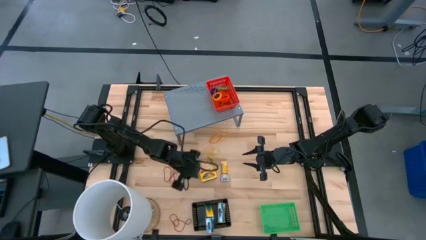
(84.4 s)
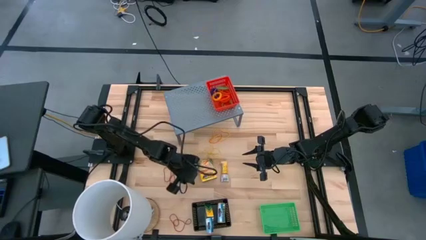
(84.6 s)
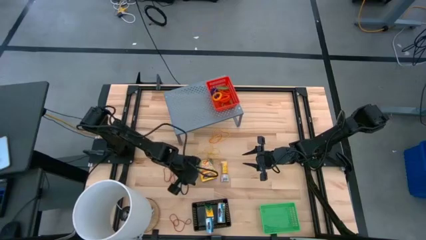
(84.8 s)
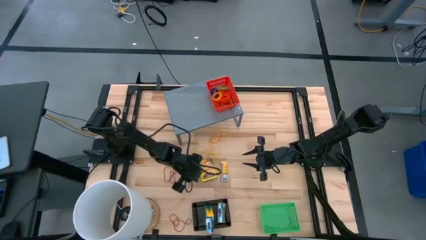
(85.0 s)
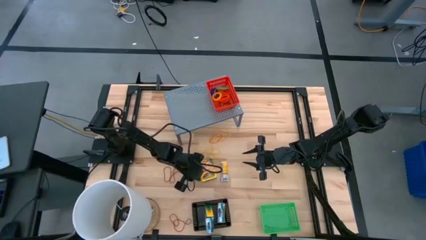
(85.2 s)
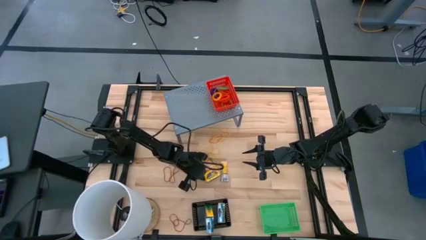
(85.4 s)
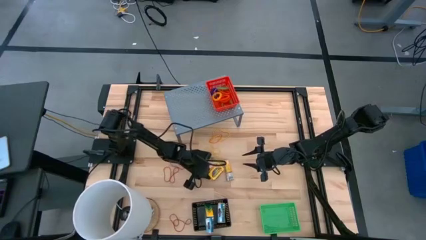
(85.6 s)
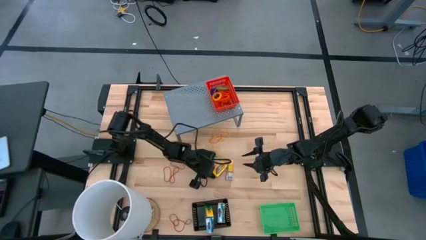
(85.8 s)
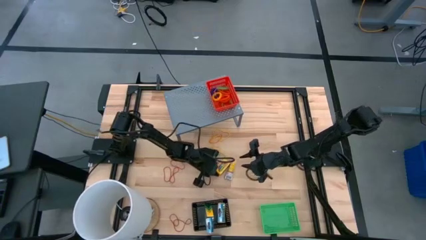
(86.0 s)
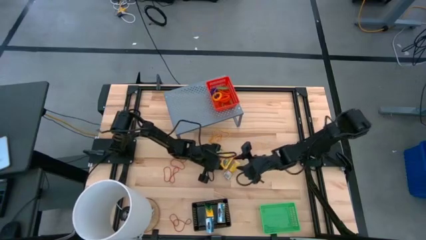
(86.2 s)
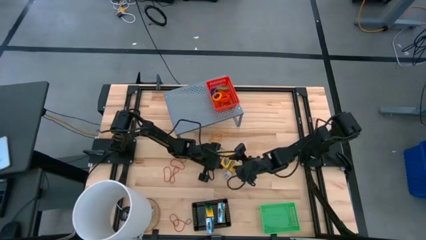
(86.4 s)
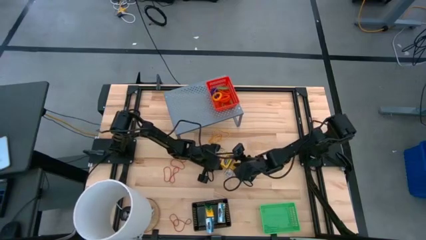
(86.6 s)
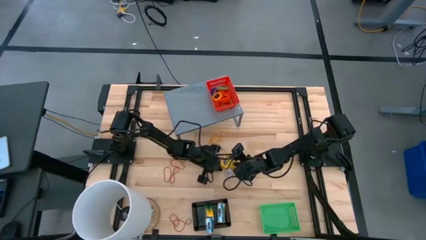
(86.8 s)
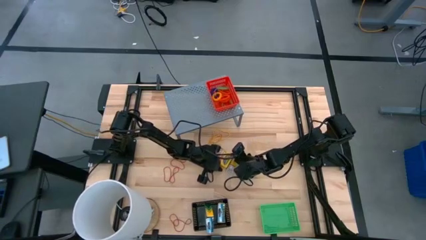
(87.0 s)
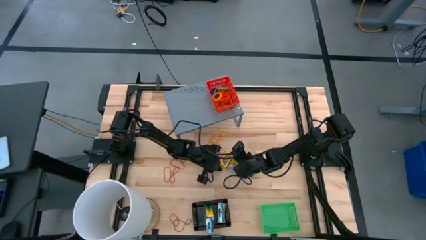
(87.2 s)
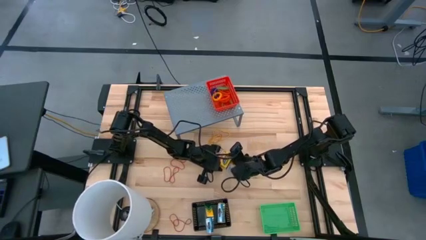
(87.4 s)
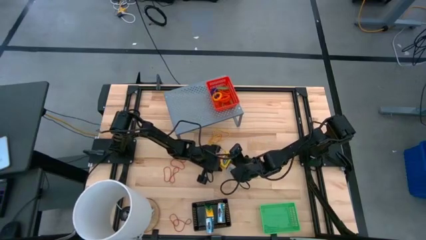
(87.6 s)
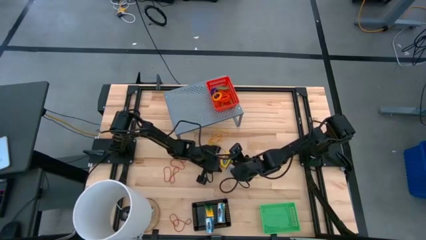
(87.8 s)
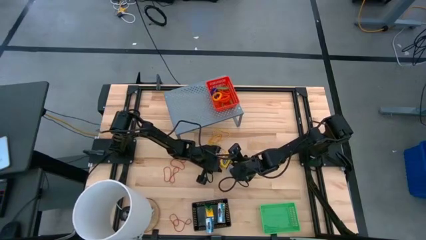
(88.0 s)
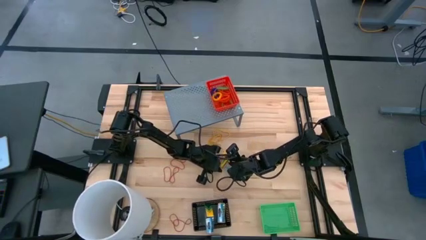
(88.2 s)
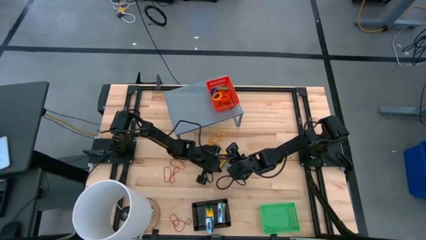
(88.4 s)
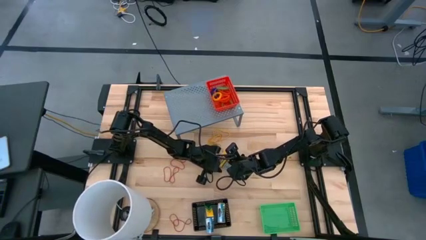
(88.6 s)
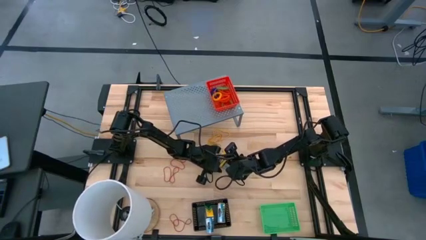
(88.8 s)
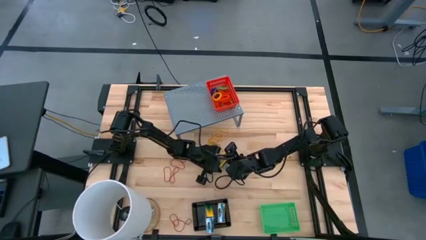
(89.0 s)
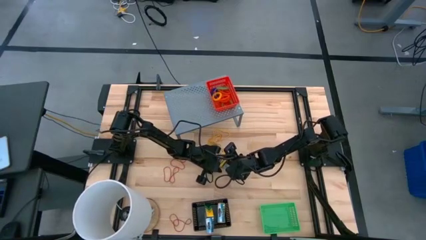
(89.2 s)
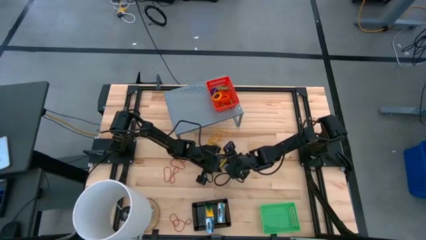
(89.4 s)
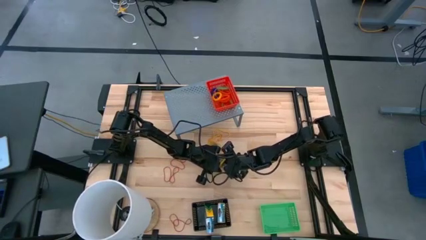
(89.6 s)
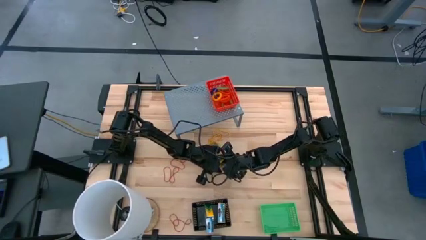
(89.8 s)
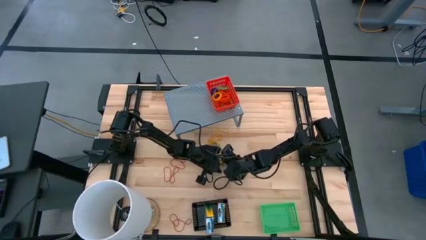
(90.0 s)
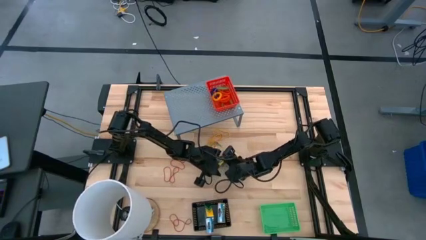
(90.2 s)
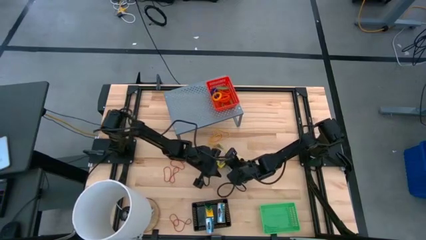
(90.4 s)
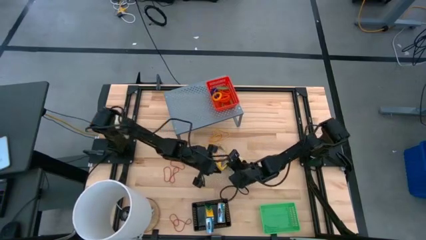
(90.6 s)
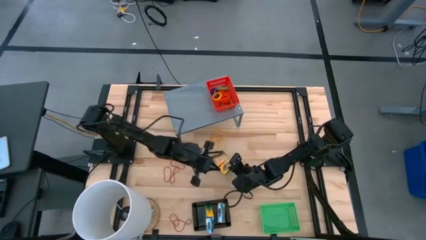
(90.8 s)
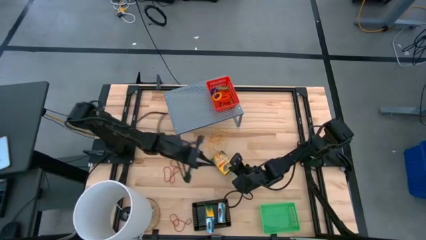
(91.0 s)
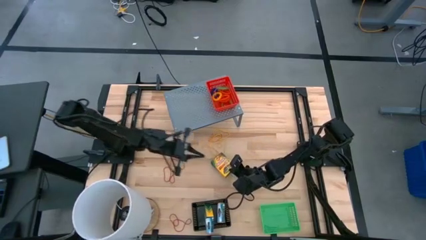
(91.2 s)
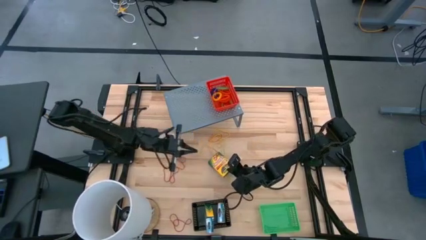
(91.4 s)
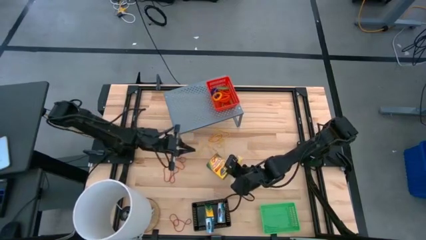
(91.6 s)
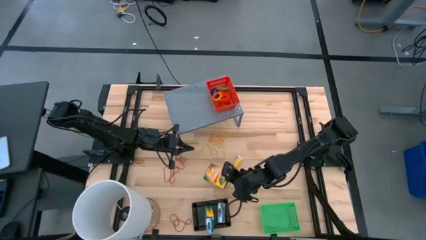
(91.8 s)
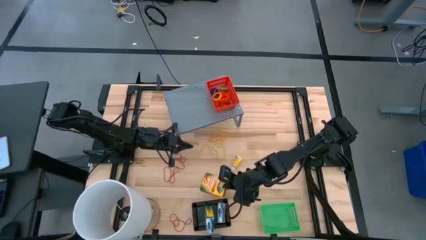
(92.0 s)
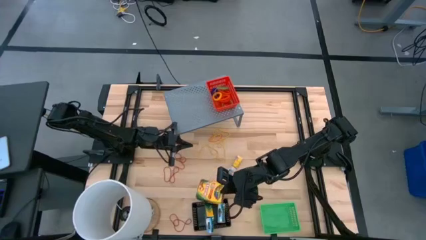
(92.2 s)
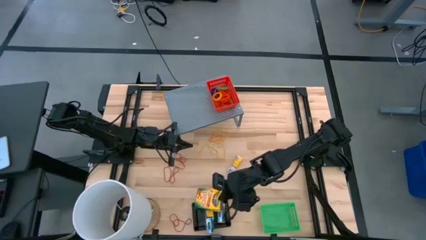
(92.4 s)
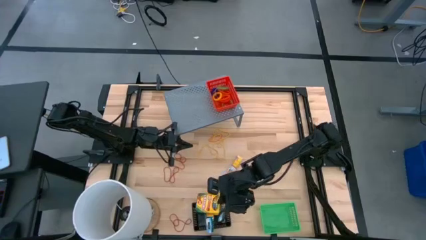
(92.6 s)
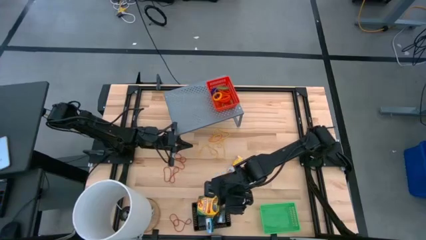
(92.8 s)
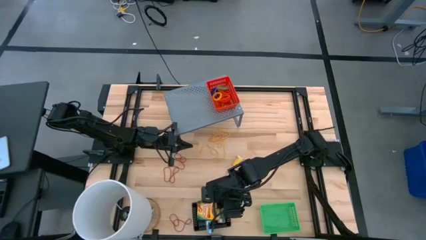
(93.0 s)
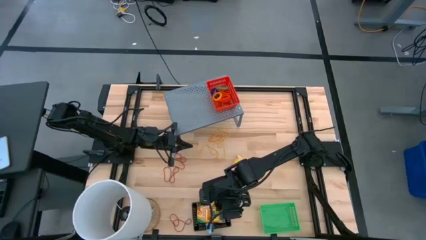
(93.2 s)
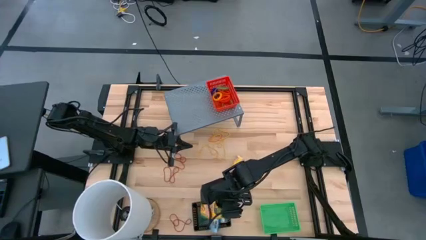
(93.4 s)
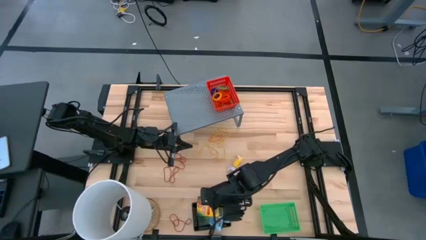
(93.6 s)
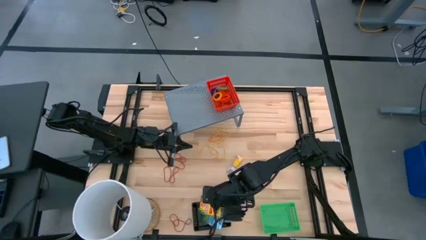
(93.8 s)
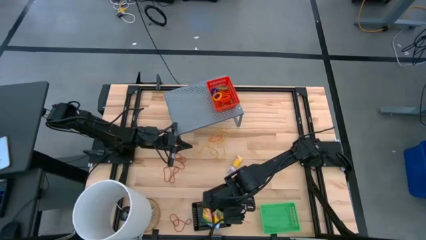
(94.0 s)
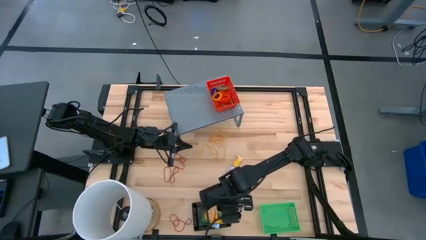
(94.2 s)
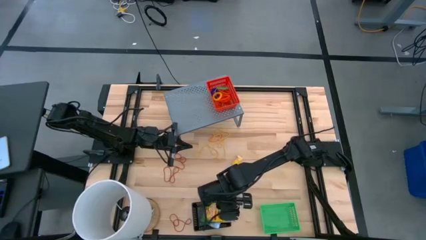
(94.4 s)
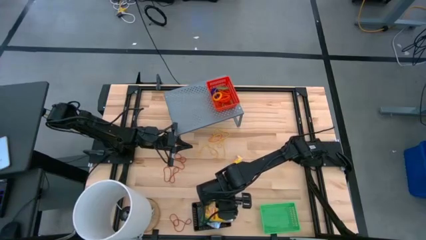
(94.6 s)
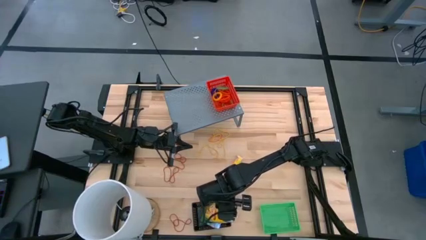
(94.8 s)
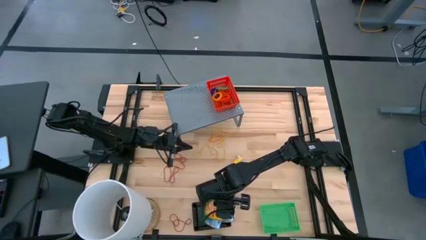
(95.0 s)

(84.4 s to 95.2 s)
Task: Pick & Place Office Desk Supplies
Put the left yellow crayon box into the black bin

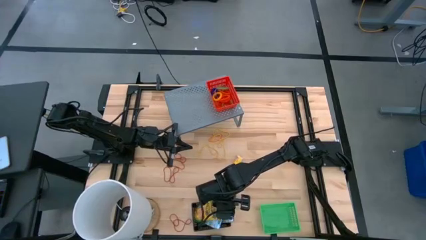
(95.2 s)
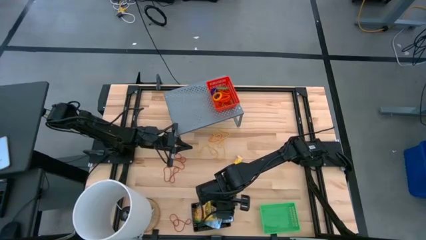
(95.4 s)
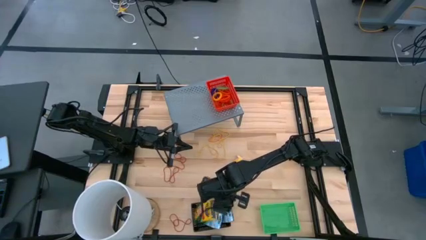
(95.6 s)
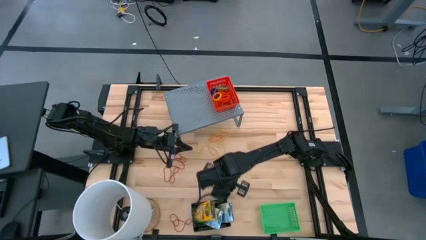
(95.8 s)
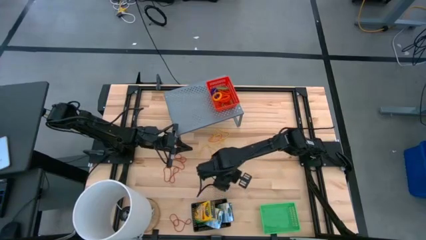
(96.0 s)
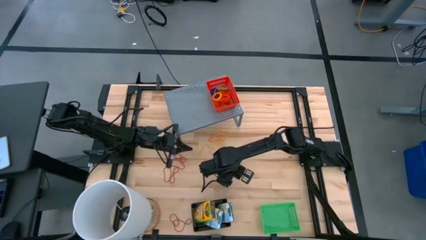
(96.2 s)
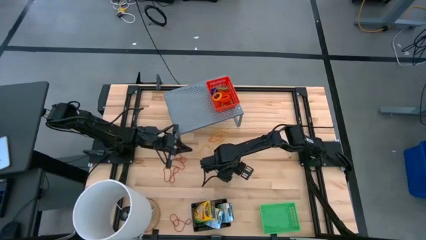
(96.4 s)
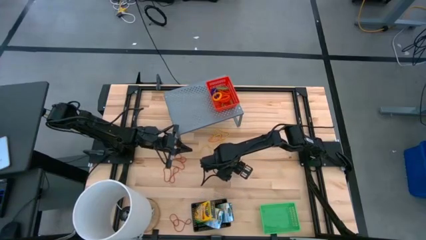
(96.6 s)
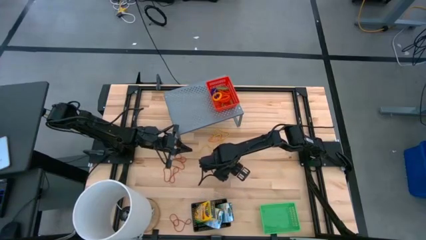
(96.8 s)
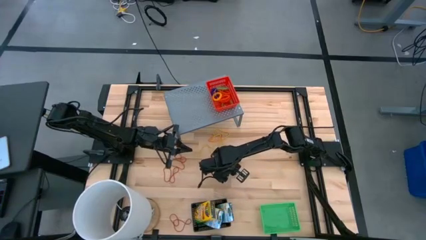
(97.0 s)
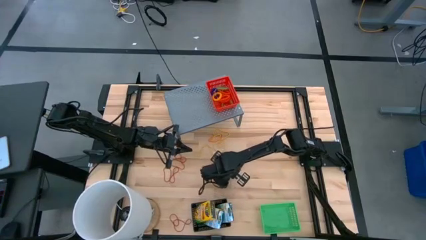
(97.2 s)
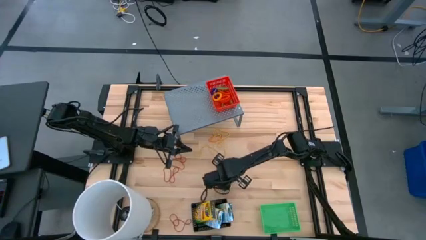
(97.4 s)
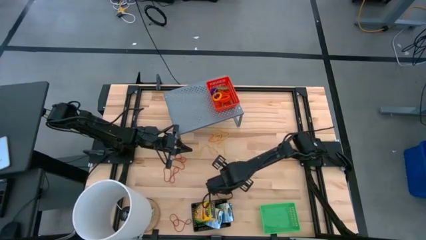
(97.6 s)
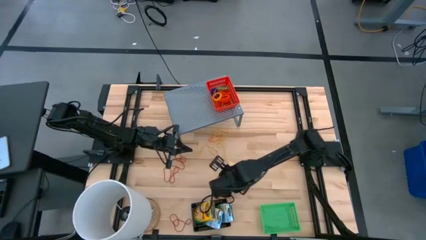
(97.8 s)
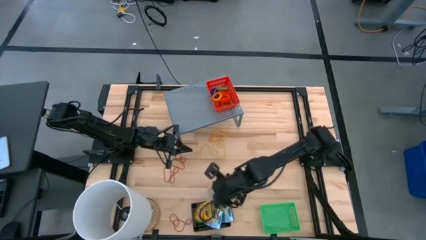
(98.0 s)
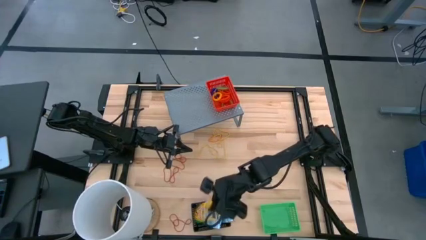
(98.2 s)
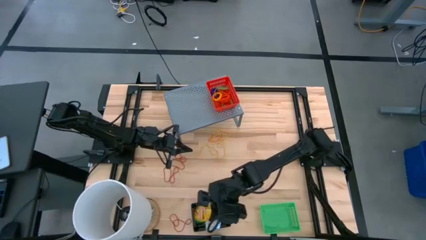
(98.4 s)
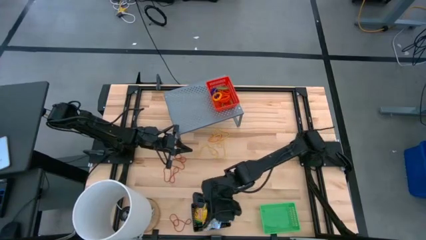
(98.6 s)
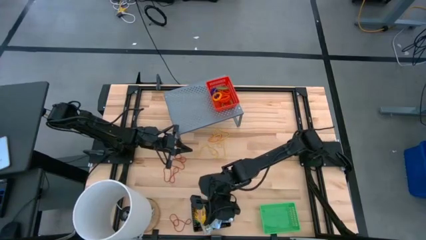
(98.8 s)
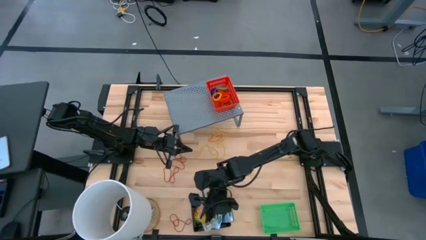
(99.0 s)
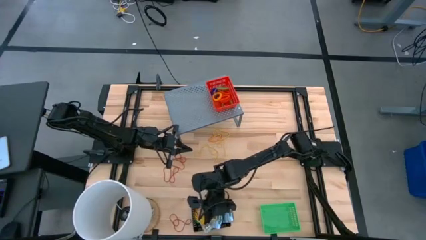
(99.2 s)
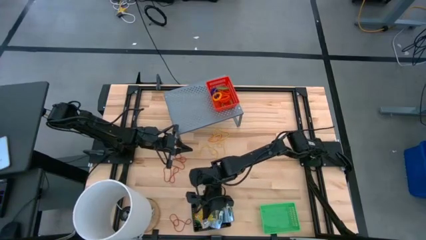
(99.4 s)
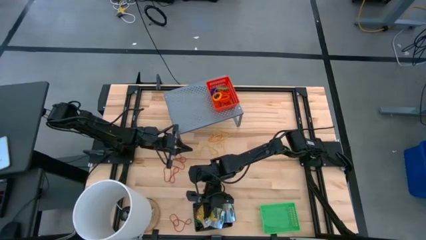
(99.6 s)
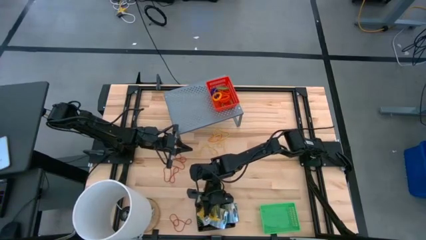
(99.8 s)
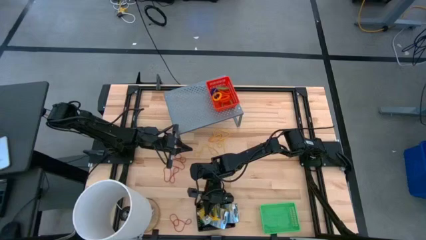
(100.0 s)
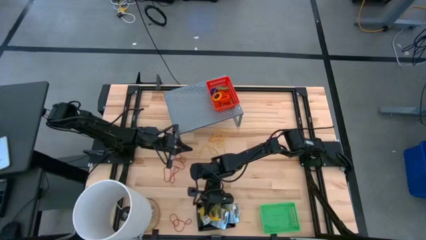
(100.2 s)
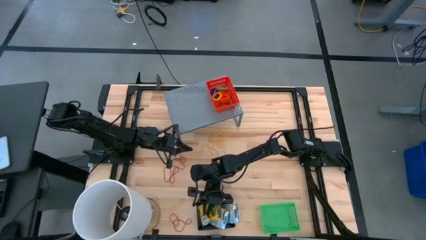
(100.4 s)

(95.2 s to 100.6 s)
Put the yellow crayon box into the black bin

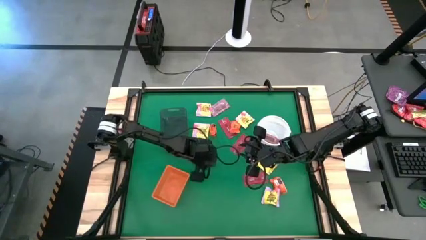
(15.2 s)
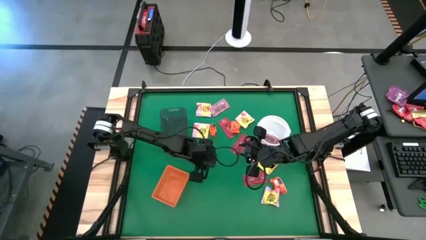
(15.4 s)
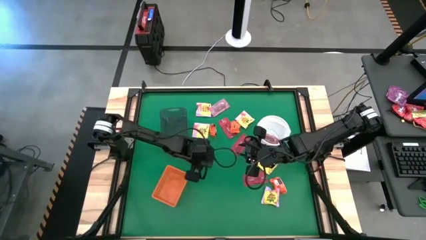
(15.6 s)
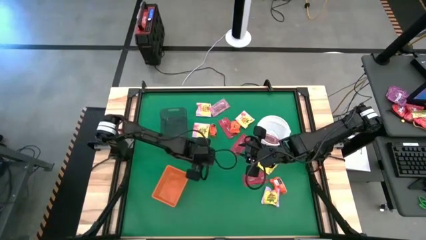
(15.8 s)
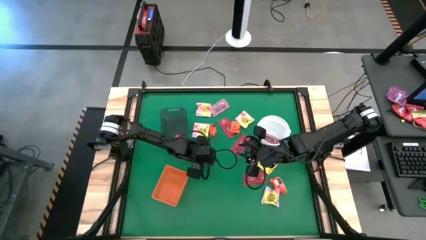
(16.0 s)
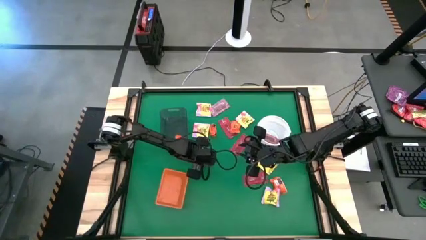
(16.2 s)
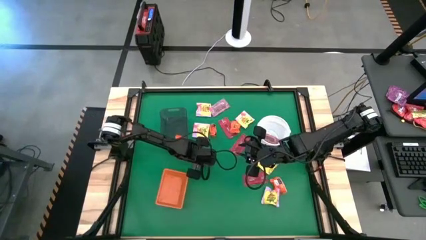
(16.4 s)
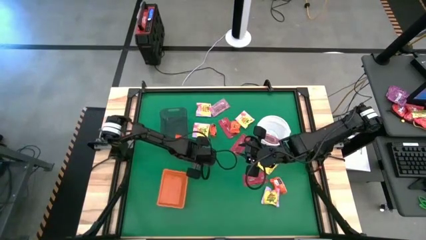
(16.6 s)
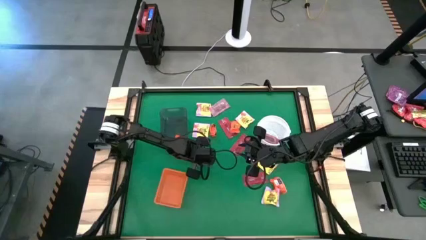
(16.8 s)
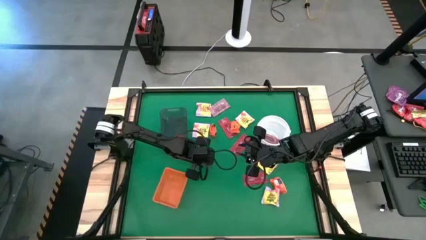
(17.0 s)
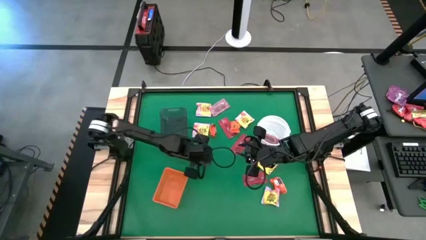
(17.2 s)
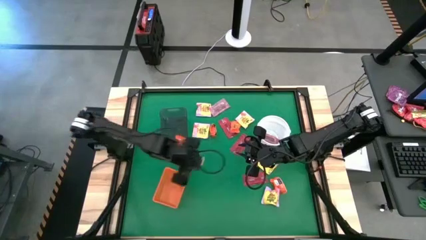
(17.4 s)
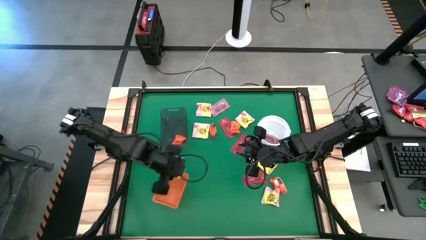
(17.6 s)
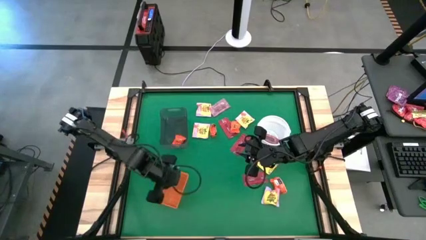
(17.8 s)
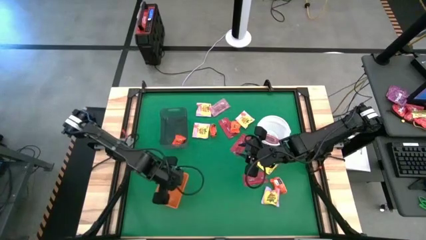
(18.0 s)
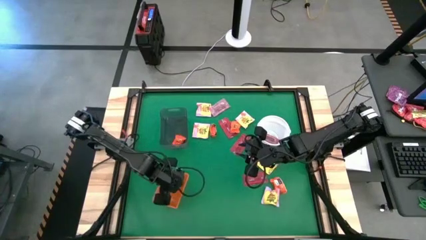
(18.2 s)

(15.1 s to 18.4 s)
Task: Sort candy by brand, put in halloween buckets
Put the yellow candy into the orange bin
